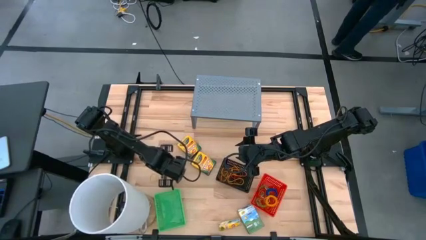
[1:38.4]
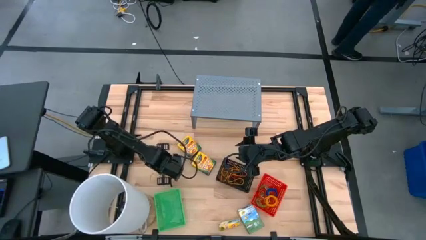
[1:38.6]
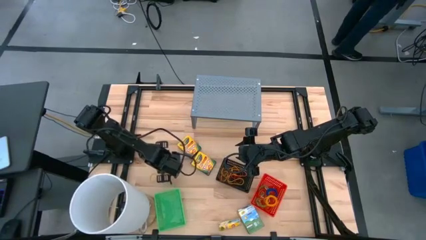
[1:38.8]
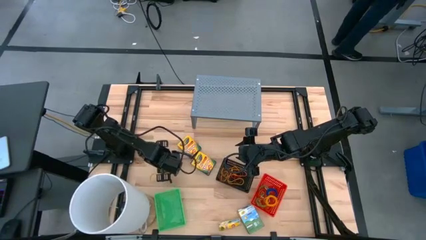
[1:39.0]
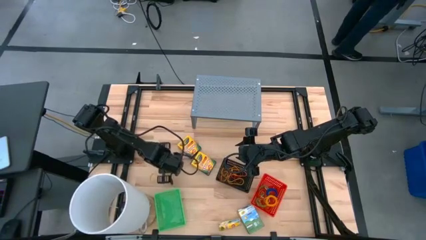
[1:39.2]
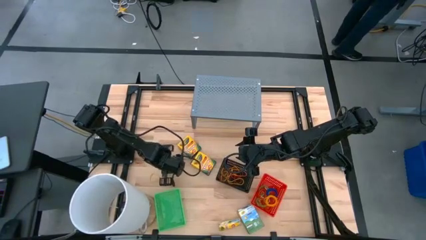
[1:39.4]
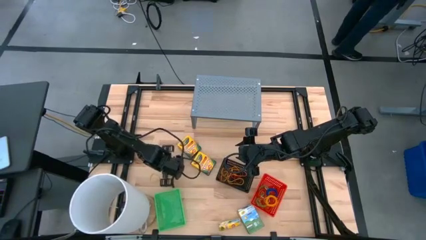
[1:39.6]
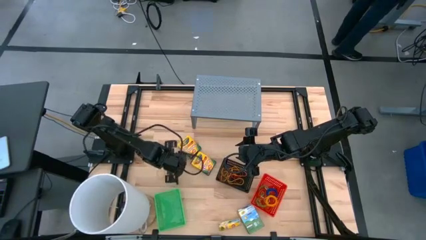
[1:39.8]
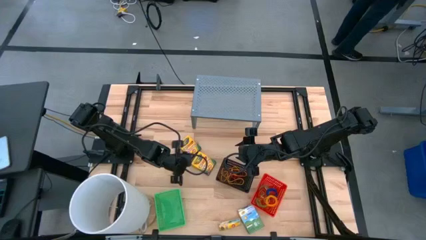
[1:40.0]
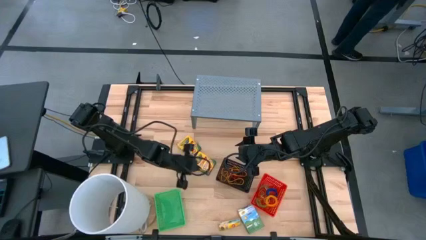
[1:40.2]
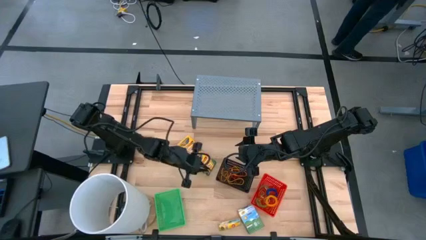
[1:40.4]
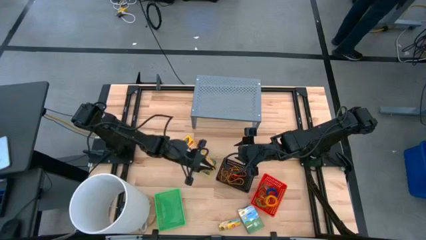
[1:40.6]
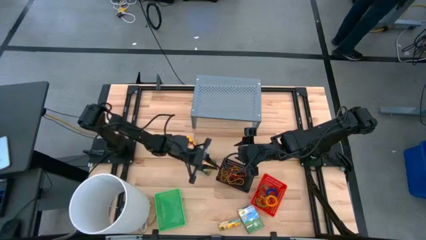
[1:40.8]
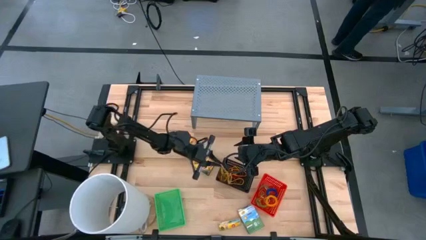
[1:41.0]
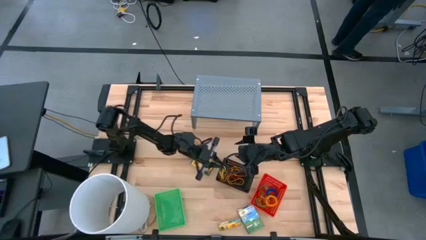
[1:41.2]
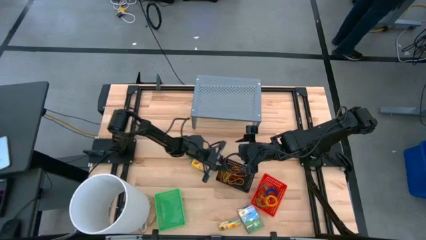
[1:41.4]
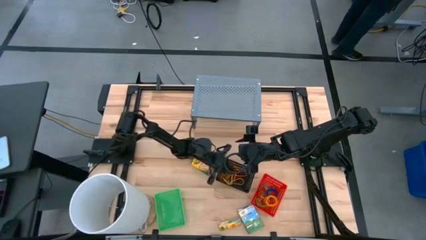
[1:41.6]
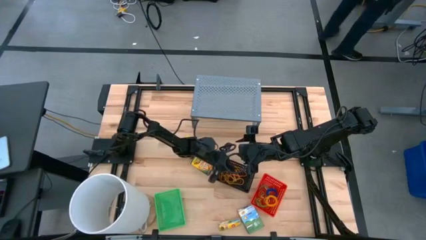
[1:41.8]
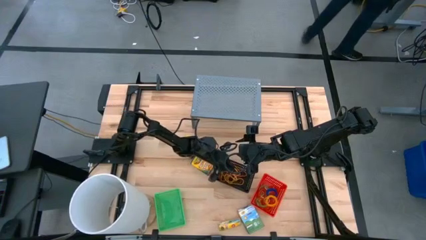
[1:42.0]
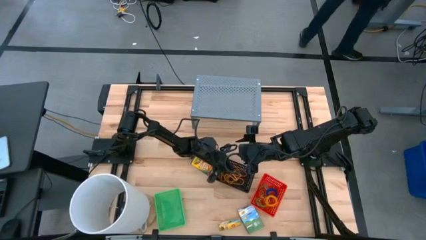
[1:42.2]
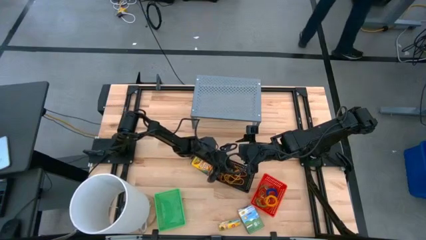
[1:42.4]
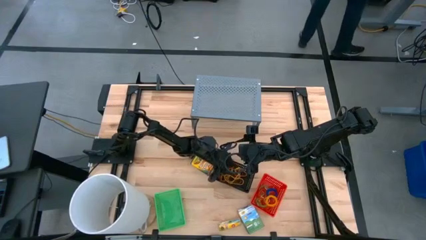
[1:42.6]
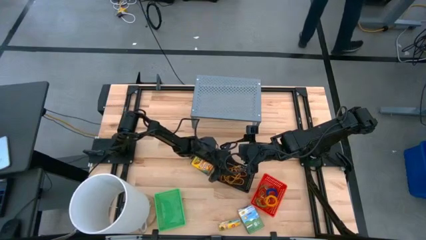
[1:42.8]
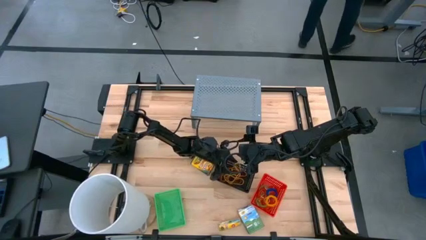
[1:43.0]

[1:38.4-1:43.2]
Task: Pick & Place Office Desk Supplies
Put the yellow rubber band into the black bin

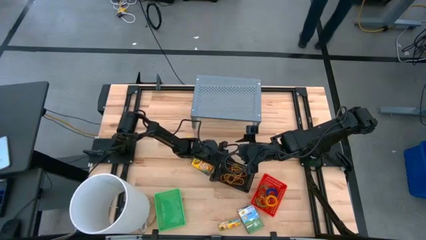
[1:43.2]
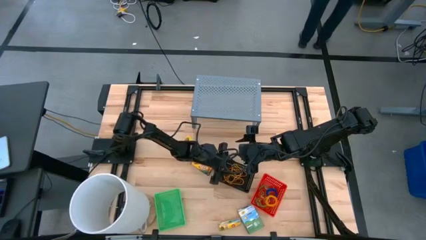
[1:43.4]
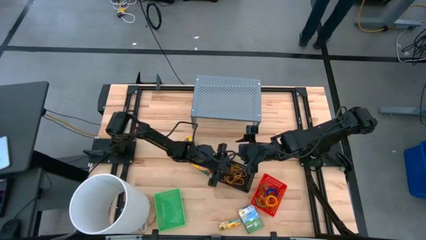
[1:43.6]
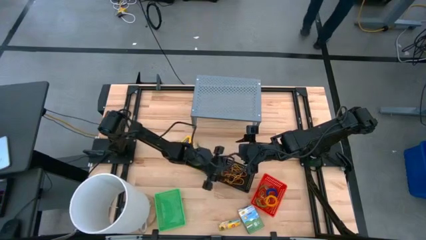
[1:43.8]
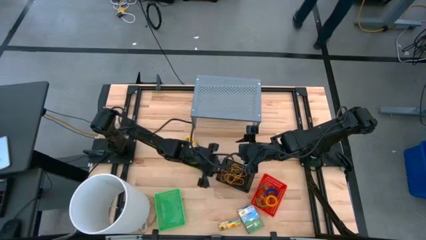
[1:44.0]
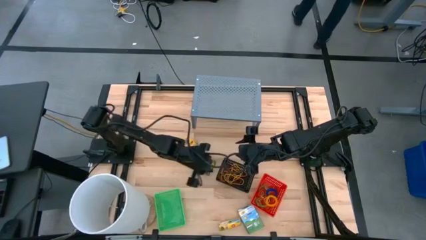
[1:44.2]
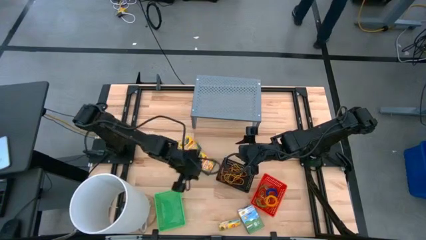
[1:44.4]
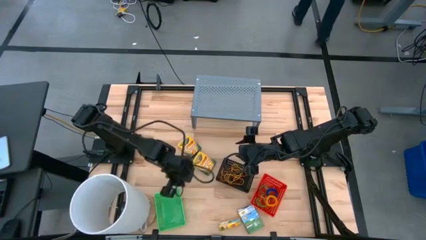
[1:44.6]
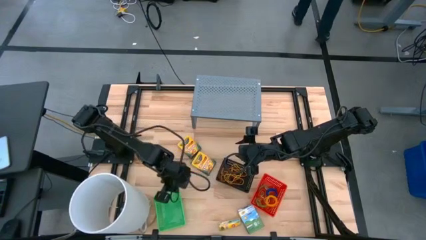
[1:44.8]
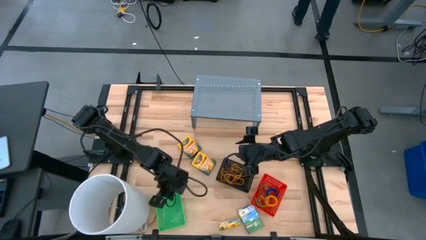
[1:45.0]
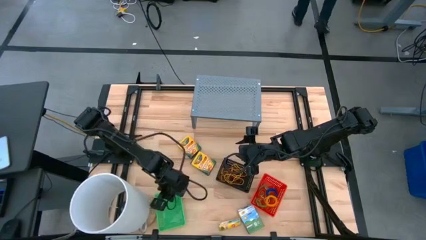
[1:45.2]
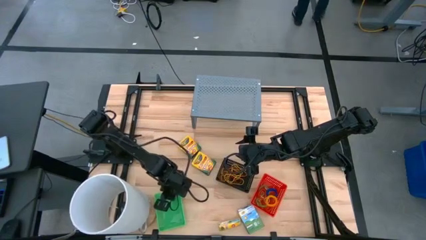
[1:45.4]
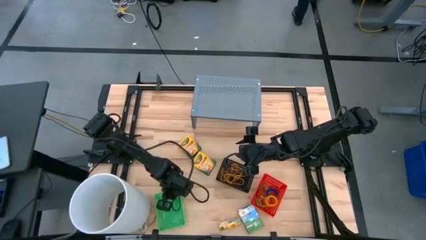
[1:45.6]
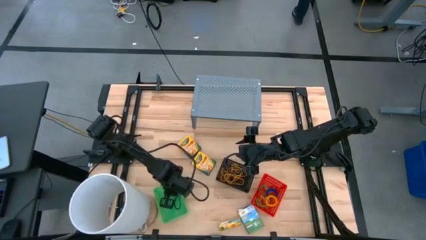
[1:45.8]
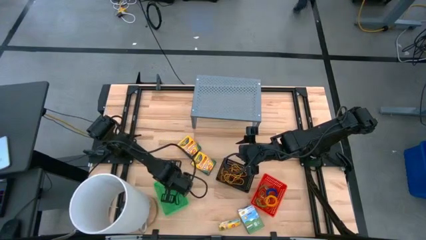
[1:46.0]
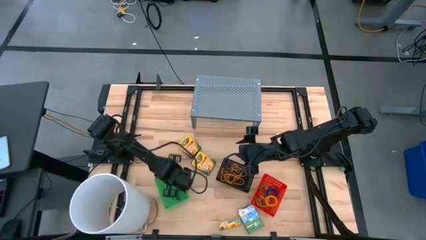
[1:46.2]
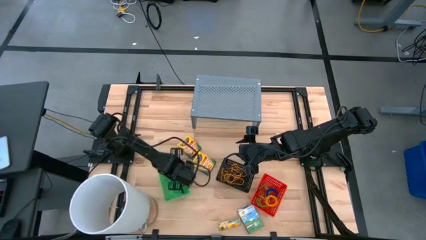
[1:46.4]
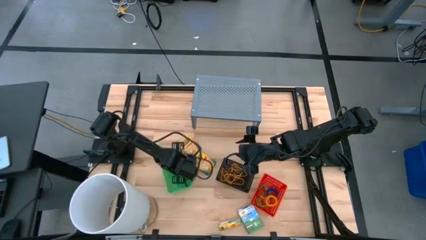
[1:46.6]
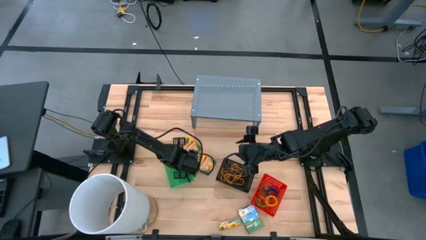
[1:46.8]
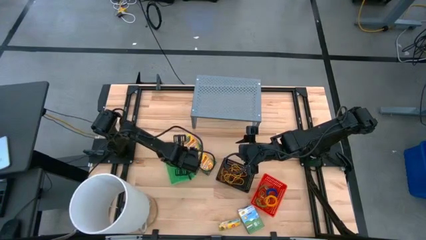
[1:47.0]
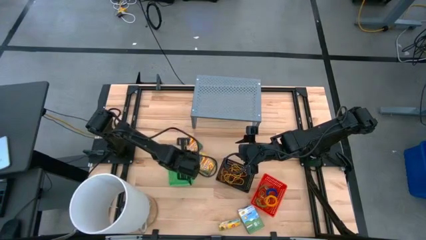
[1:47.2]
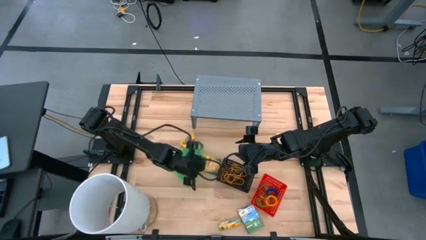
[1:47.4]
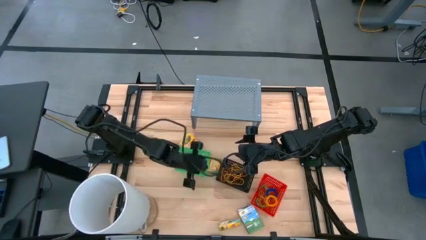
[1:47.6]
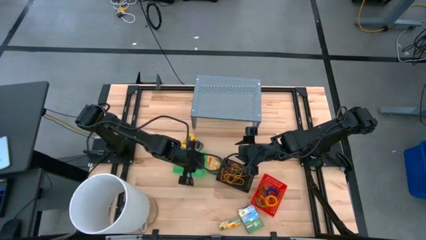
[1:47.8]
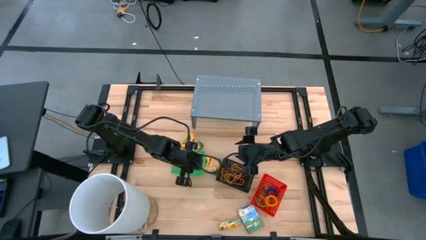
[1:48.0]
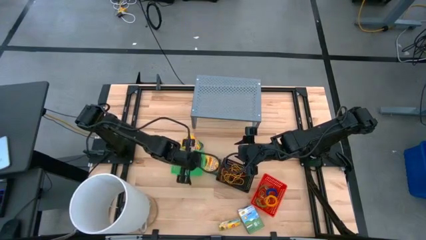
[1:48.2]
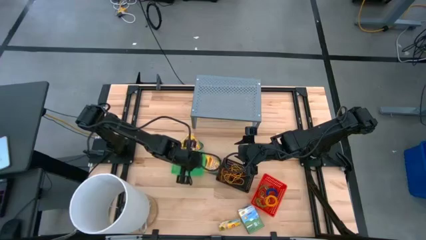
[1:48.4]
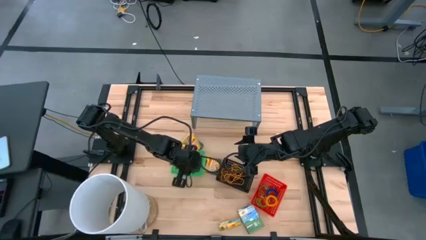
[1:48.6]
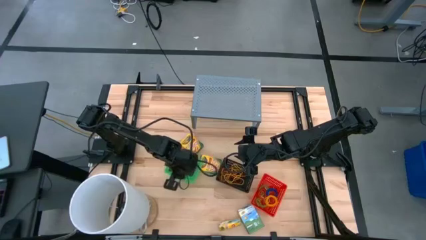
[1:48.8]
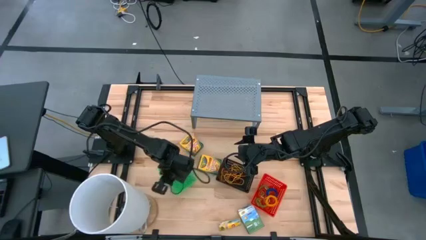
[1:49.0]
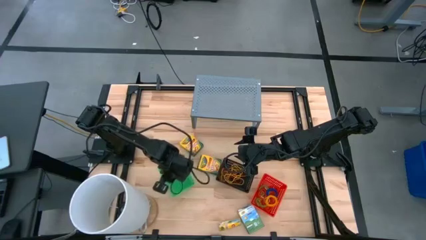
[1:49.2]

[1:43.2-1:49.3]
Prepare the green bin

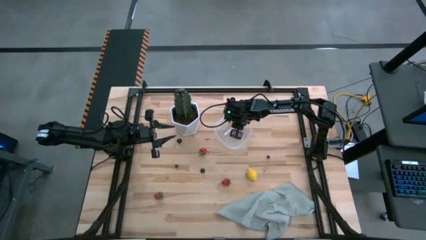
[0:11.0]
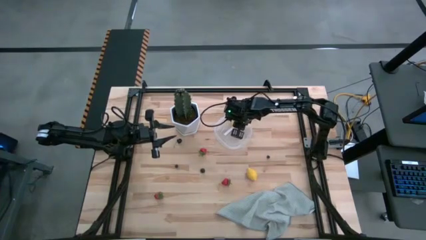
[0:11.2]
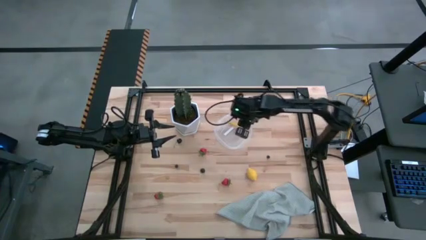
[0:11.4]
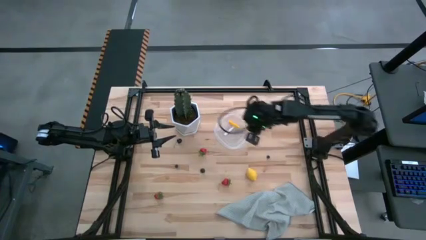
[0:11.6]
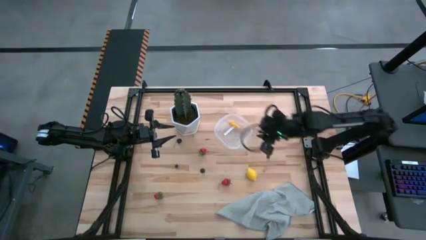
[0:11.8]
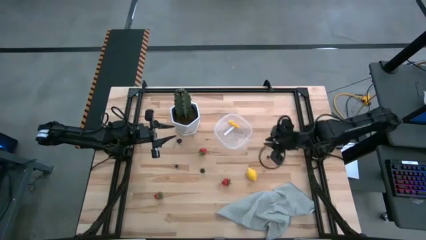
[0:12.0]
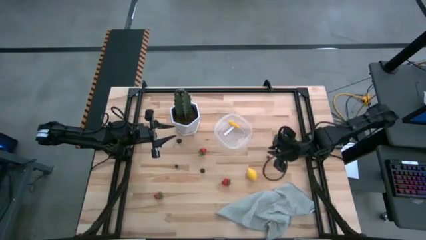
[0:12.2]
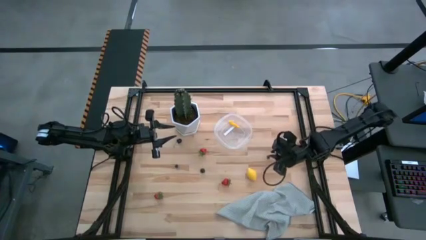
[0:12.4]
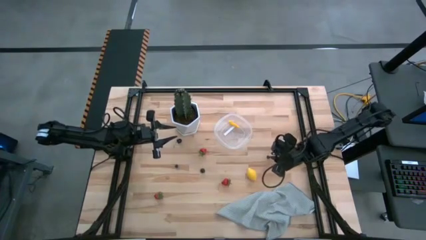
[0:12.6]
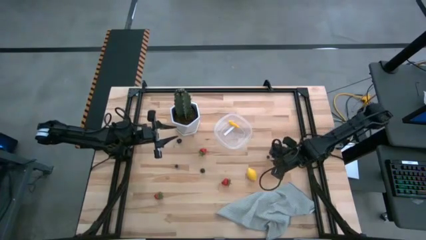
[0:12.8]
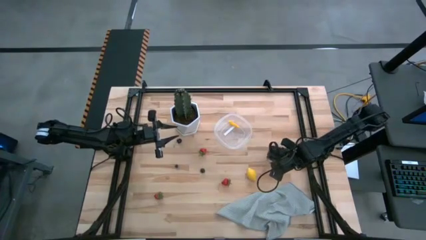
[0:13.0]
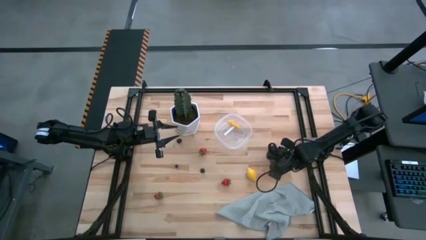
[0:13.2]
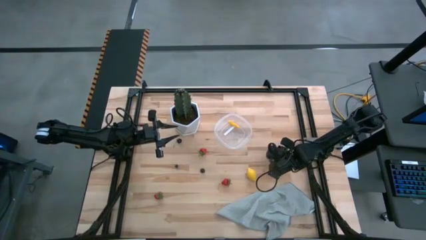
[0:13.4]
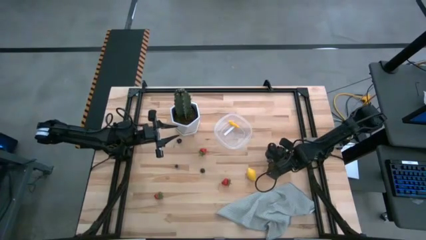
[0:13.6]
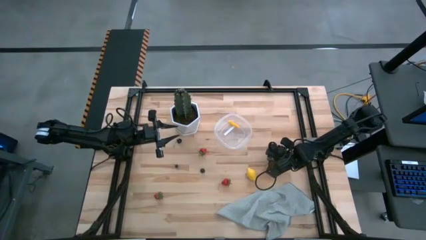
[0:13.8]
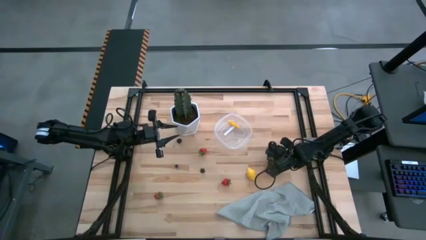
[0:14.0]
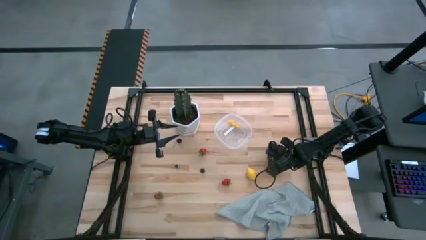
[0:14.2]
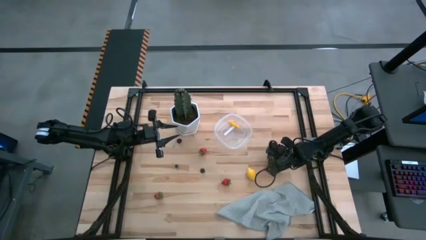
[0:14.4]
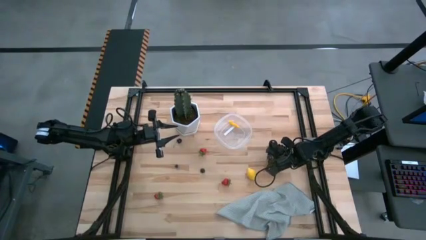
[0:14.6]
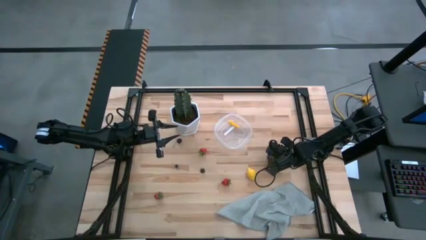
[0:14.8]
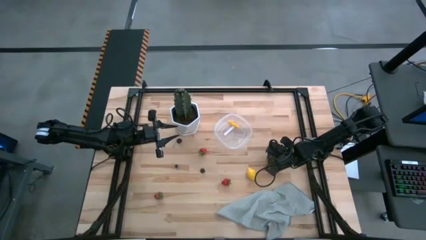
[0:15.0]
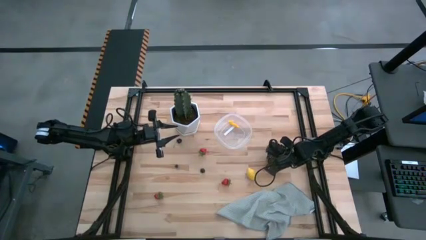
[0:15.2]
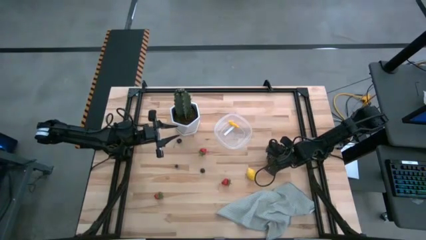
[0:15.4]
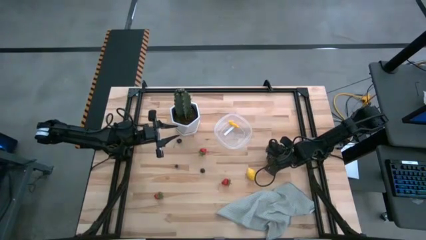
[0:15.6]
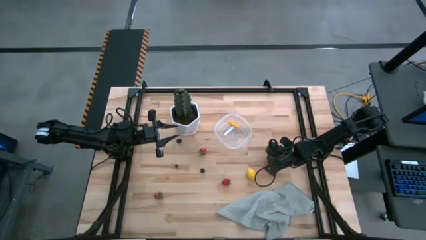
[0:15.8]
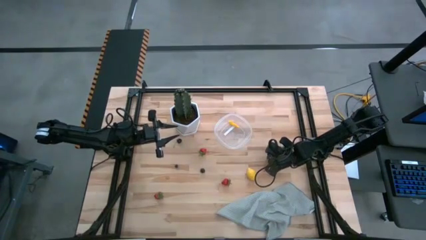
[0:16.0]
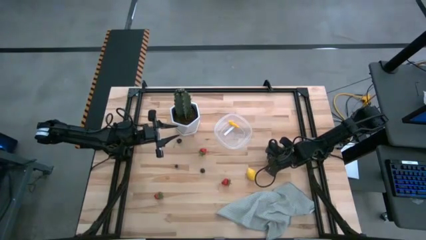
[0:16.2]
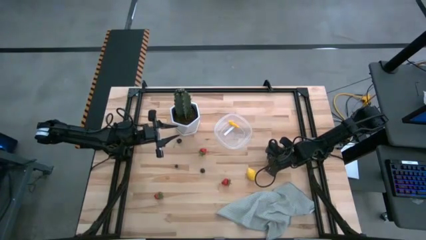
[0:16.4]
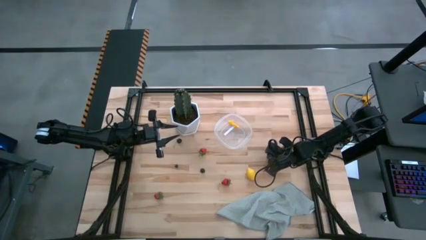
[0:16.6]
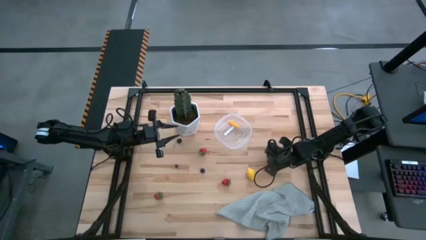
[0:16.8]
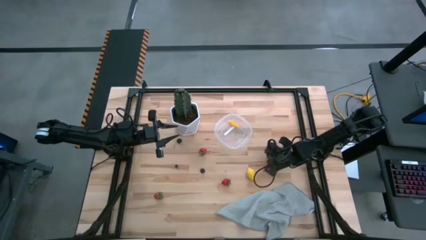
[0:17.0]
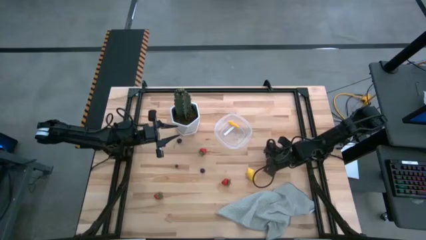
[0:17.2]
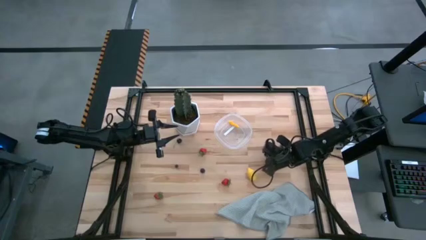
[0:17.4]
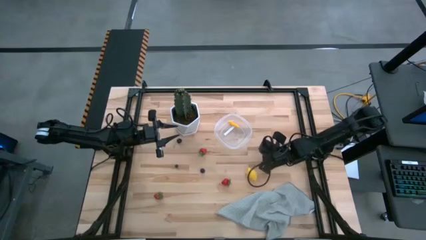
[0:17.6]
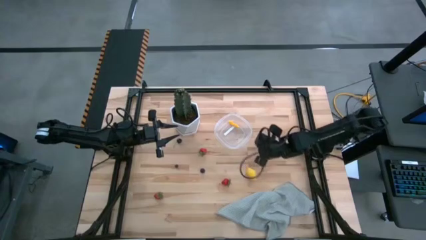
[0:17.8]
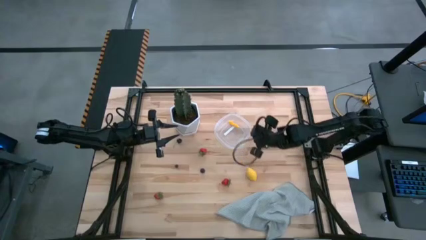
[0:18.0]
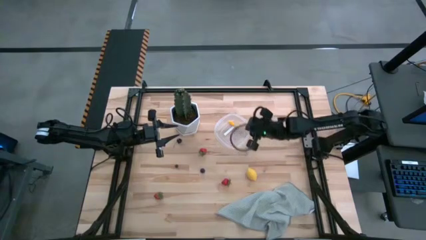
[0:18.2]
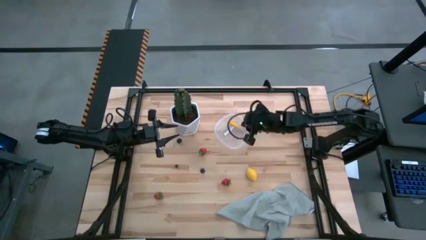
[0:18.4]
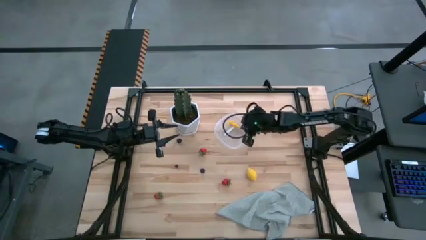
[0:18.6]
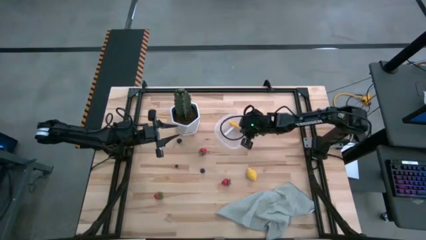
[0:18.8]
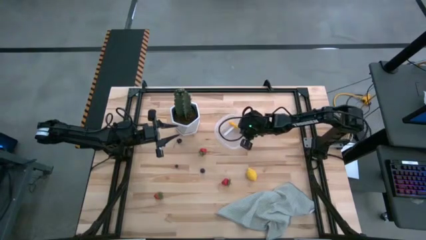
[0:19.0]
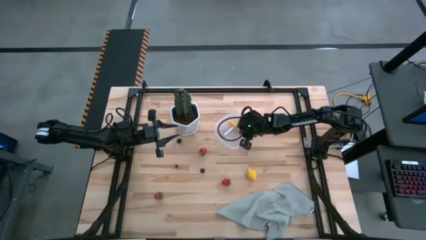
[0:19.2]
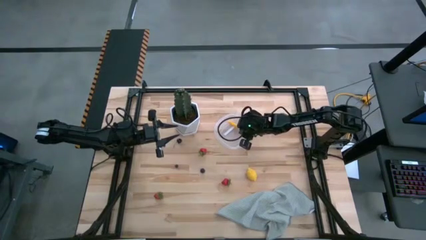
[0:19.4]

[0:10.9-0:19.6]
Task: Pick and placing Produce into tupperware
Put the right blueberry into the transparent container
